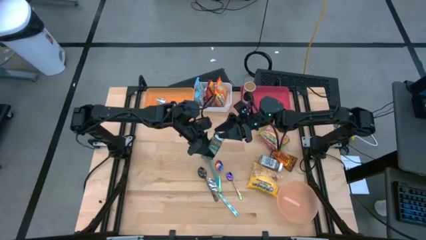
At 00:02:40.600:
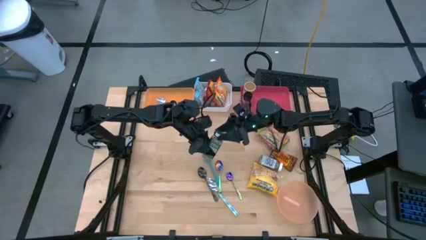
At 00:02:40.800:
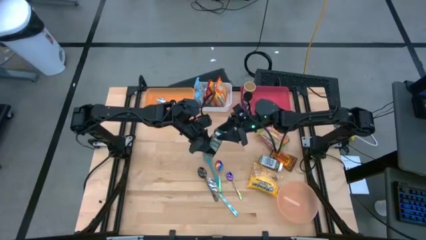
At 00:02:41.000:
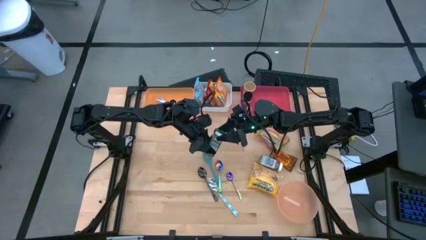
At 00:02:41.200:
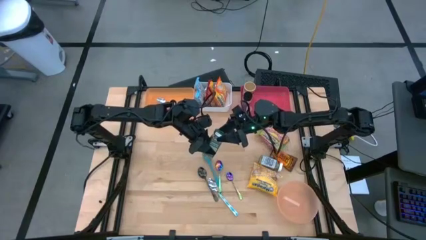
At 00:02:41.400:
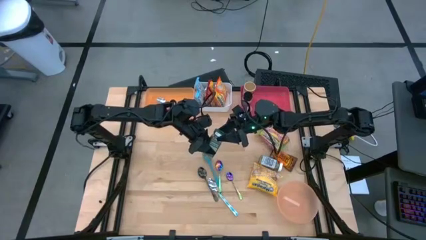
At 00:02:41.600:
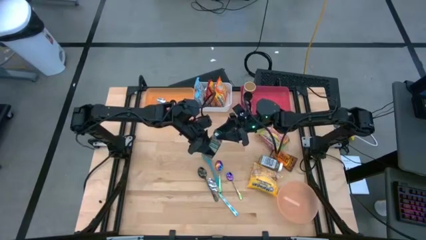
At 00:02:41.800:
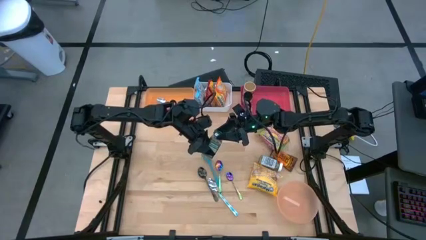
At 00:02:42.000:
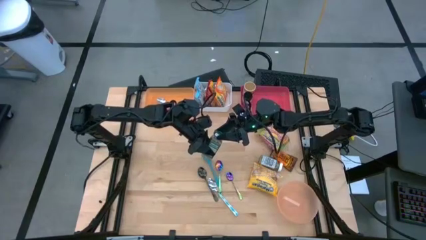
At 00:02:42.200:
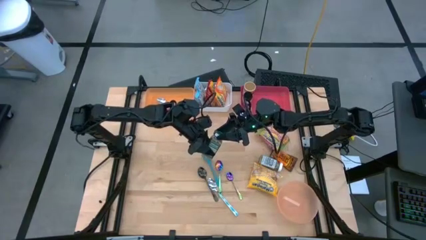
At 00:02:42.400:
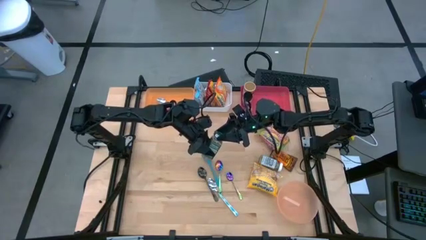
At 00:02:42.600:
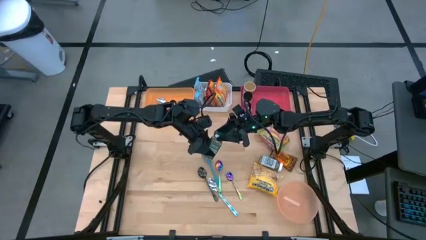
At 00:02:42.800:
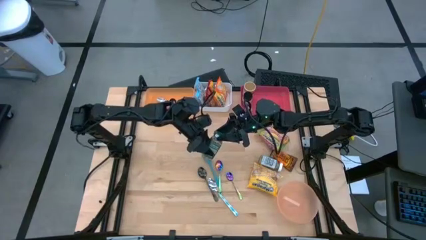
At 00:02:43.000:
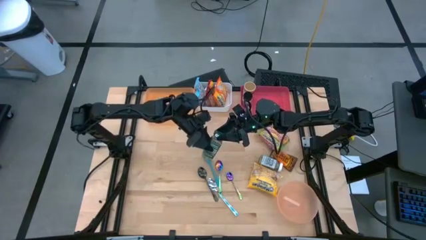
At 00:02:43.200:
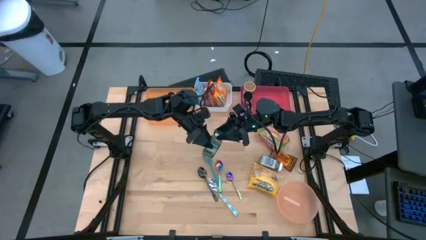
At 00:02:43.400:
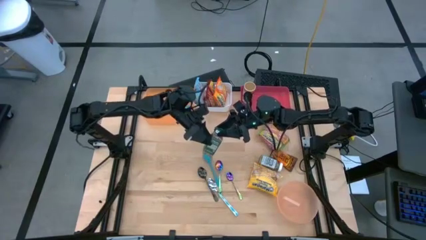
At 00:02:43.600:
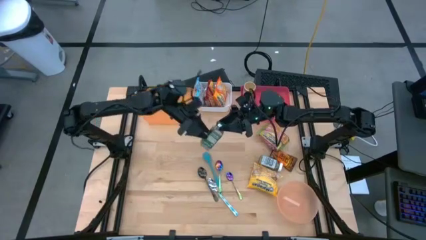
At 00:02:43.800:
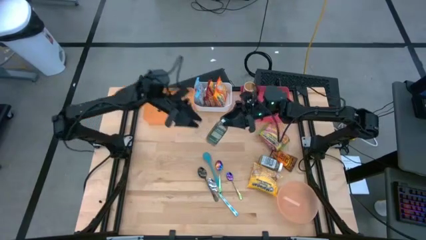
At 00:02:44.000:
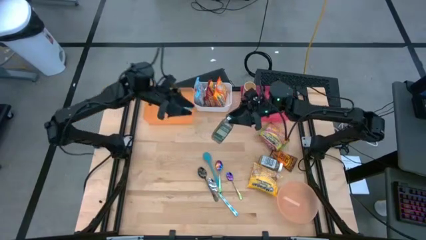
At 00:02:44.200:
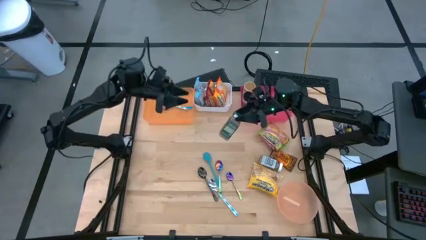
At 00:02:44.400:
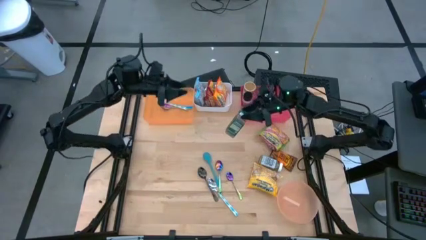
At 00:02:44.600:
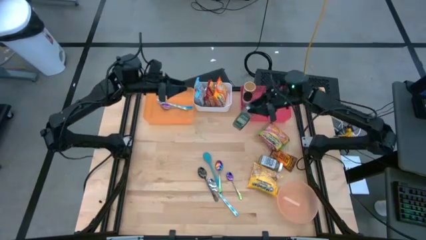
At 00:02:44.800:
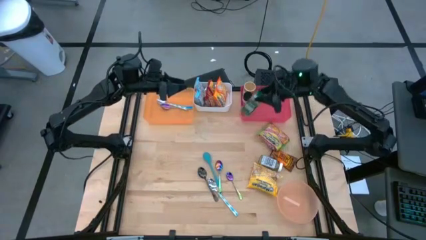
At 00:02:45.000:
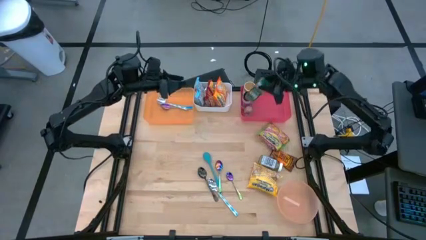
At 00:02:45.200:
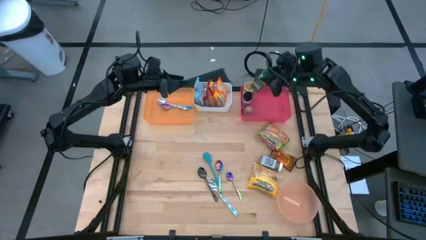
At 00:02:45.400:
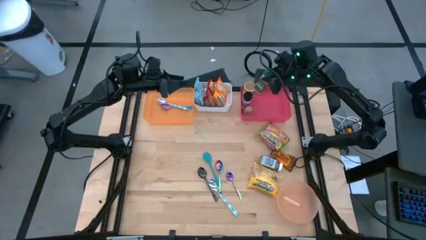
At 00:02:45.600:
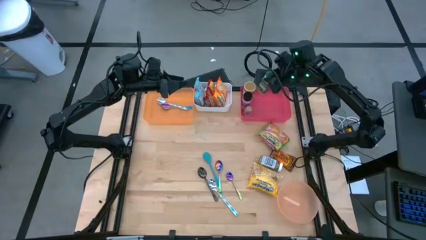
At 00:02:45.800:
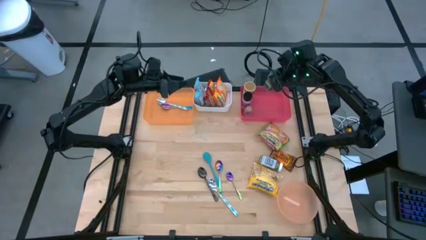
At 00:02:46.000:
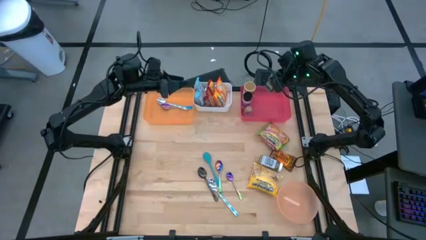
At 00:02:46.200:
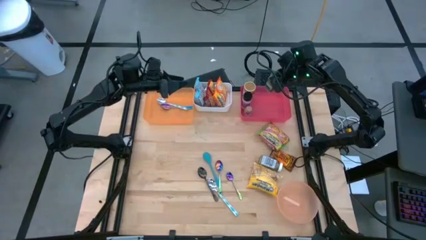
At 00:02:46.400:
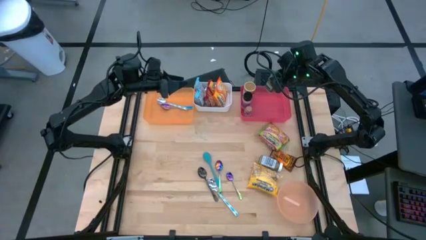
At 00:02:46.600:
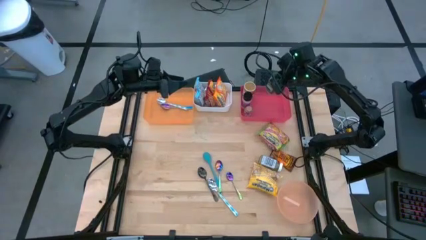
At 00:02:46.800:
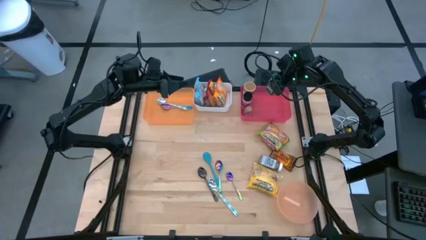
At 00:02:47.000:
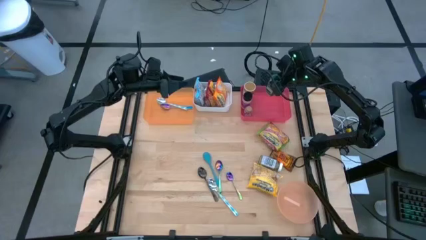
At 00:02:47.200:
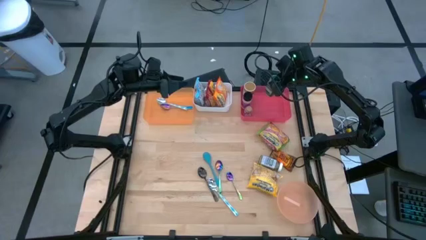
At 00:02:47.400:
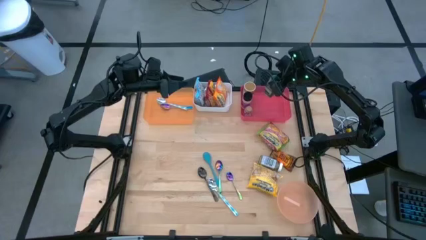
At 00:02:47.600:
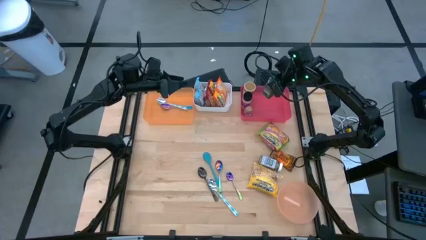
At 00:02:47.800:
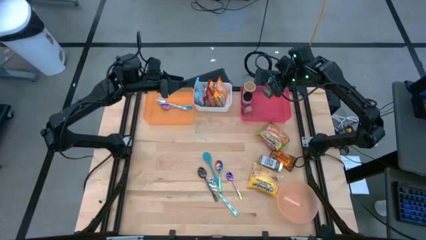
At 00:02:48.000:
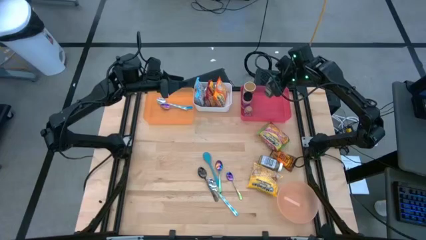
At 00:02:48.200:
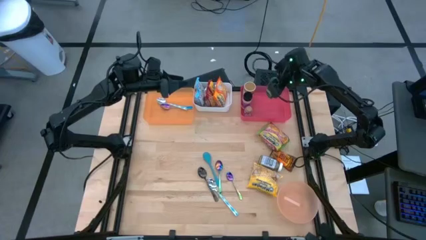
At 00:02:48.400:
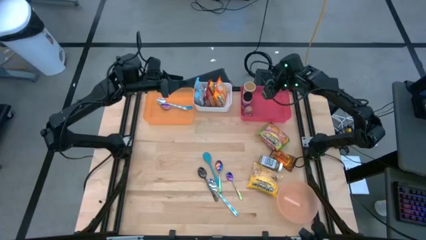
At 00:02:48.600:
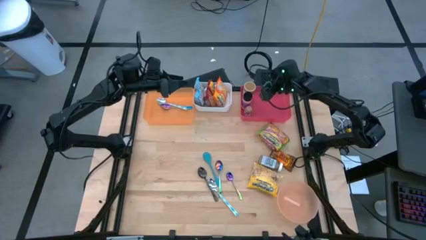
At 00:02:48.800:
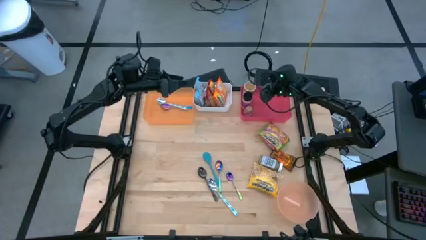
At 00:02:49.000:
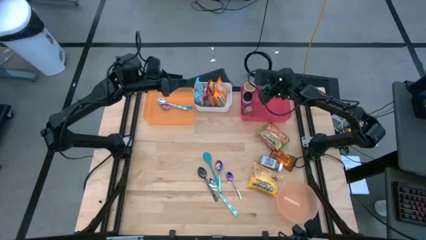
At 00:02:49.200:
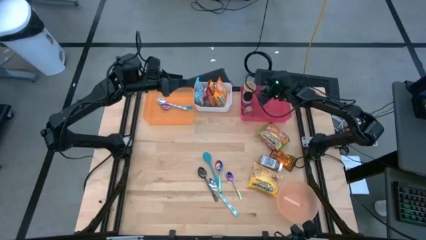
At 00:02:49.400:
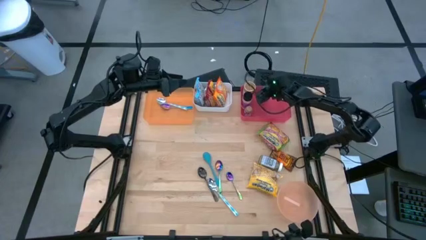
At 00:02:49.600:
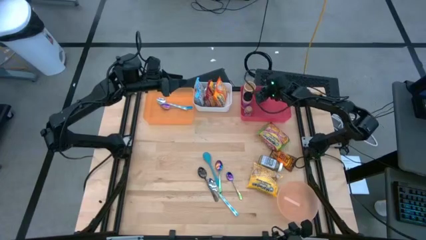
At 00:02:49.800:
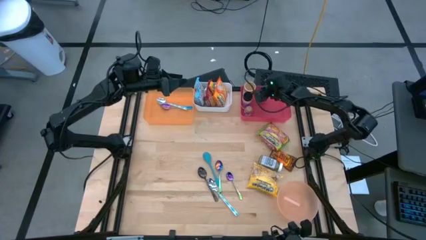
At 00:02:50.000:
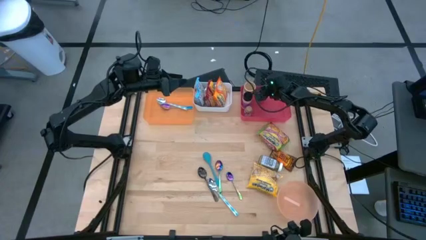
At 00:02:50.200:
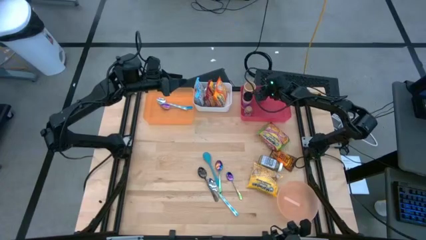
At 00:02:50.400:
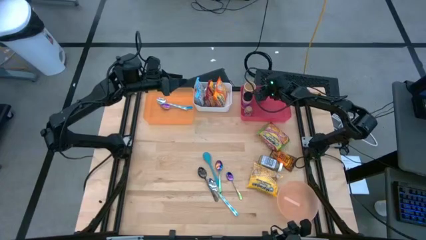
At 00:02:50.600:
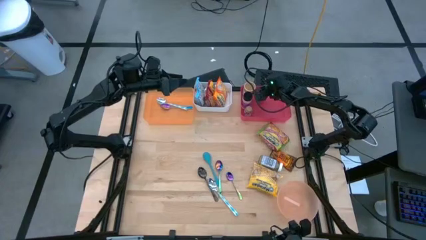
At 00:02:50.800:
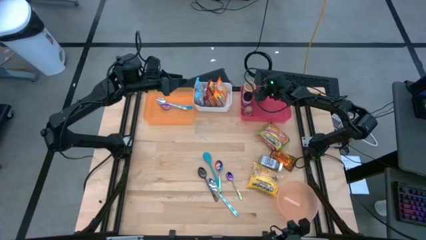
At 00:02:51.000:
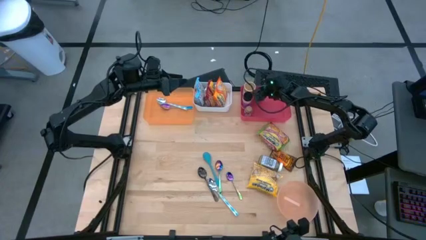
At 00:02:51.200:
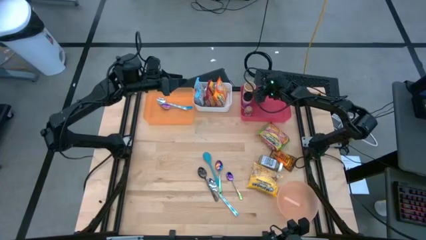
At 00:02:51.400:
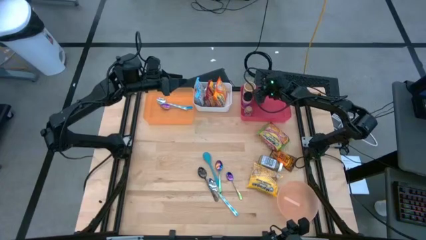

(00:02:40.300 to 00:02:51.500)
Task: Pick & Place Food Item
Put the green spice bottle into the red bin
